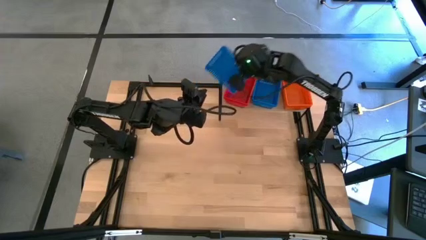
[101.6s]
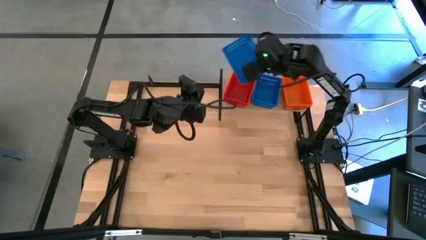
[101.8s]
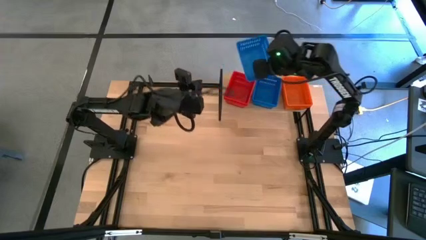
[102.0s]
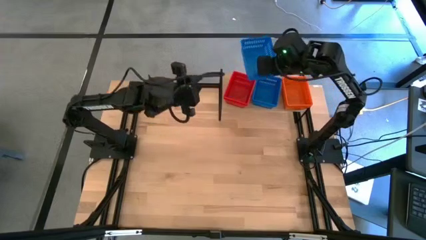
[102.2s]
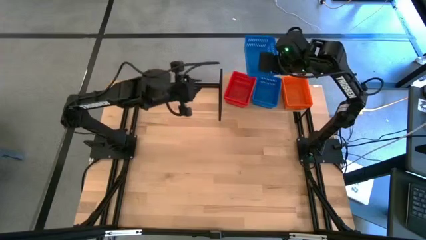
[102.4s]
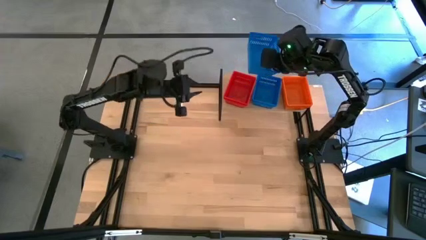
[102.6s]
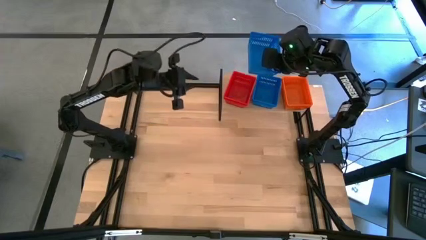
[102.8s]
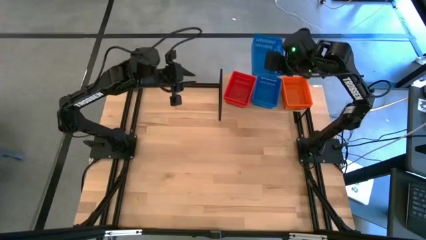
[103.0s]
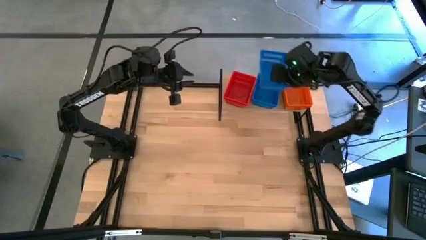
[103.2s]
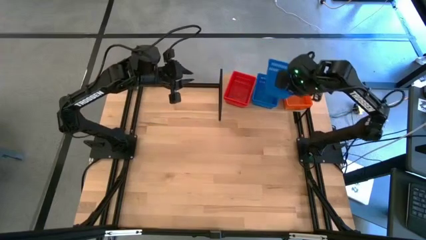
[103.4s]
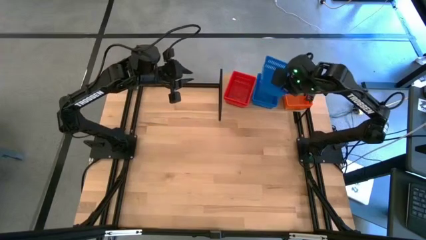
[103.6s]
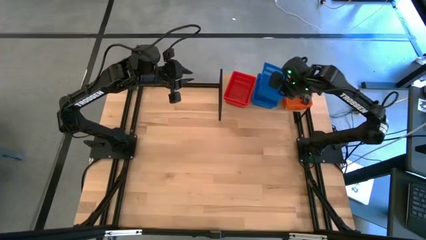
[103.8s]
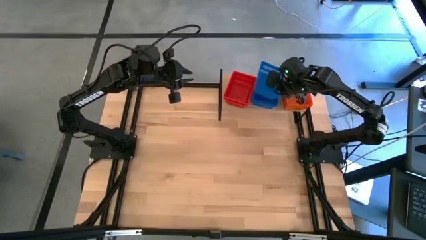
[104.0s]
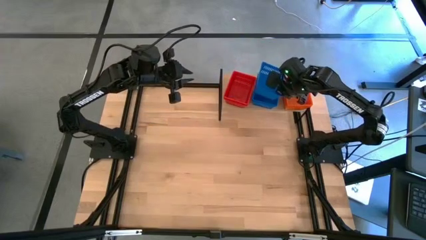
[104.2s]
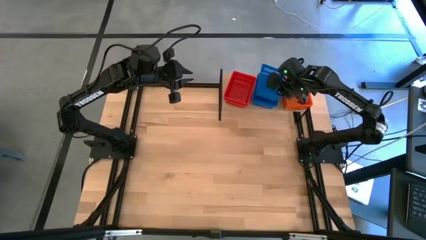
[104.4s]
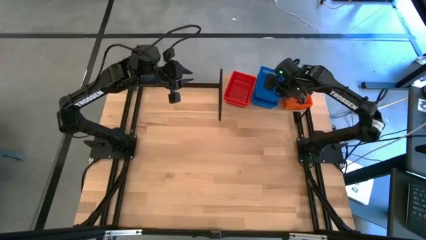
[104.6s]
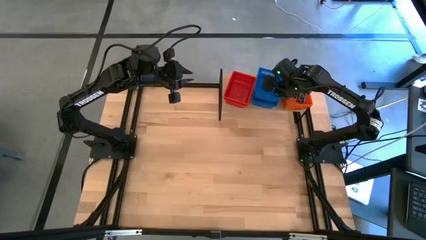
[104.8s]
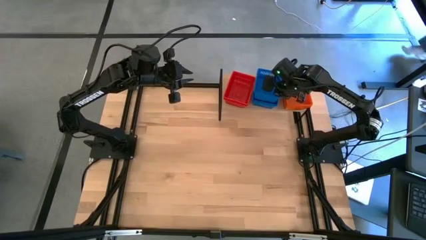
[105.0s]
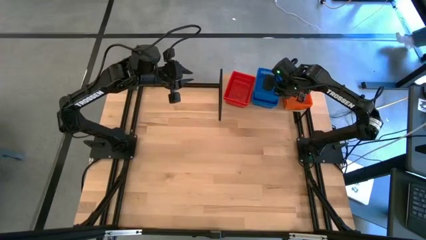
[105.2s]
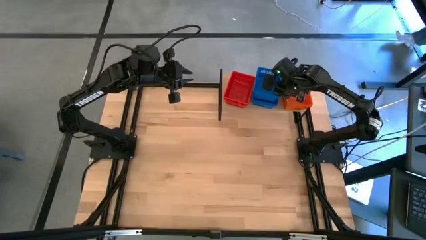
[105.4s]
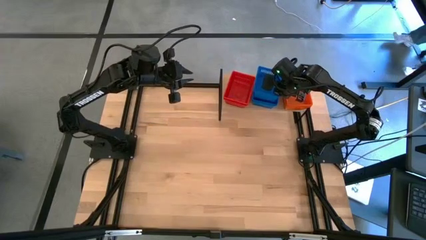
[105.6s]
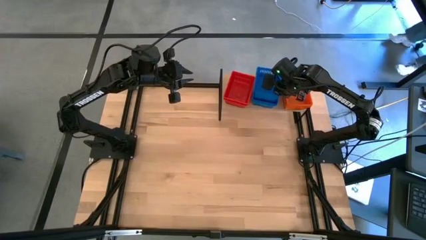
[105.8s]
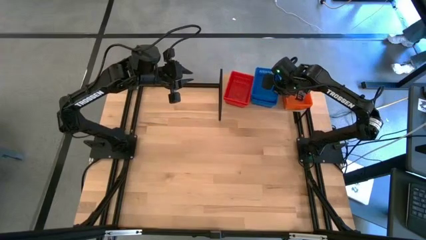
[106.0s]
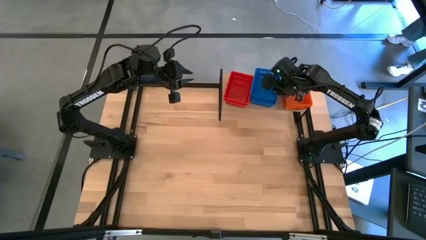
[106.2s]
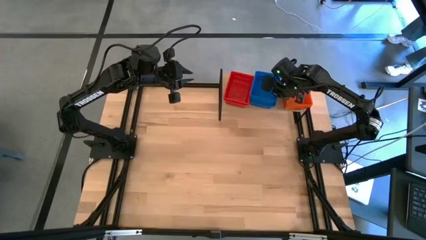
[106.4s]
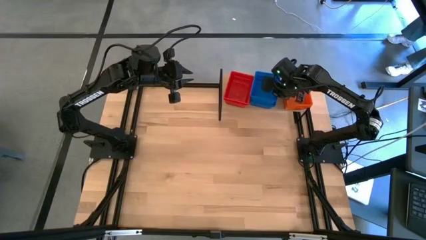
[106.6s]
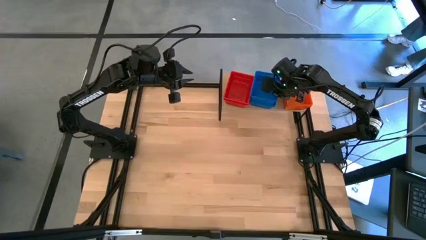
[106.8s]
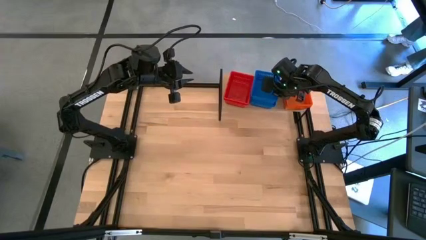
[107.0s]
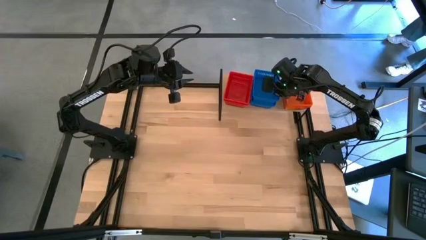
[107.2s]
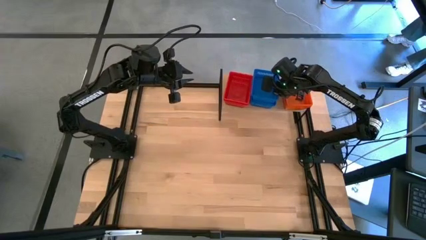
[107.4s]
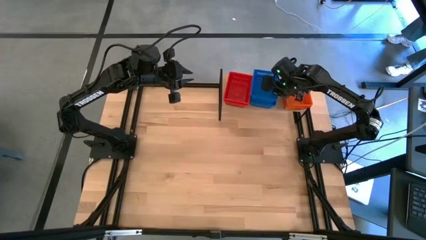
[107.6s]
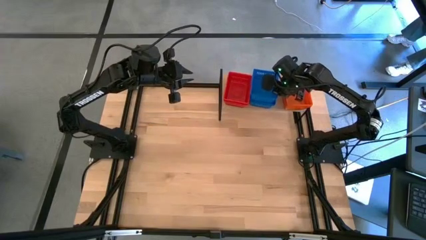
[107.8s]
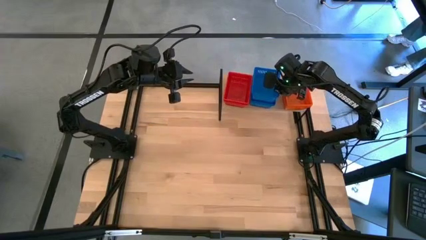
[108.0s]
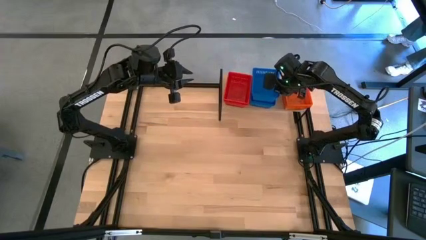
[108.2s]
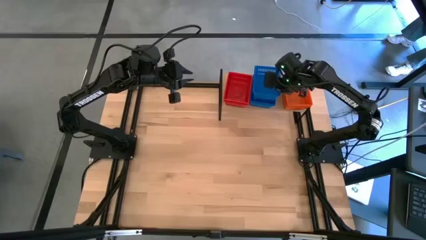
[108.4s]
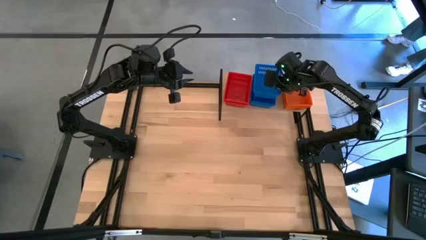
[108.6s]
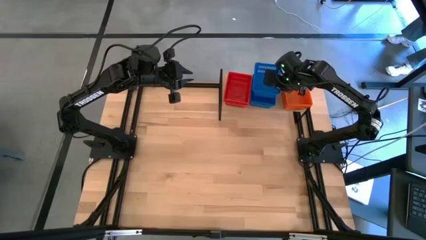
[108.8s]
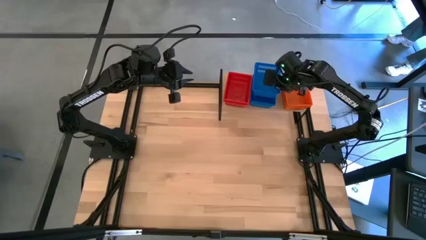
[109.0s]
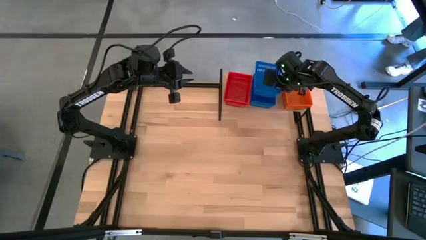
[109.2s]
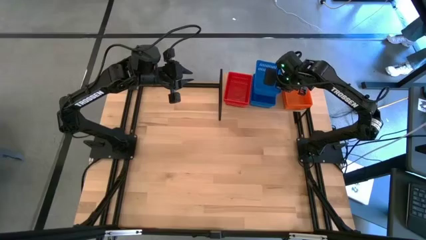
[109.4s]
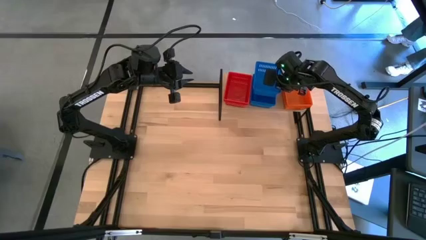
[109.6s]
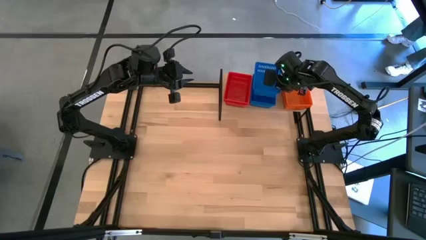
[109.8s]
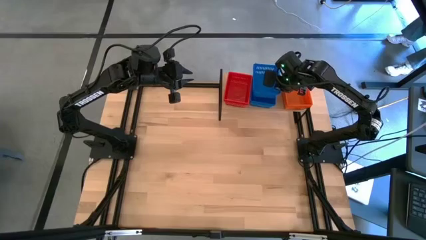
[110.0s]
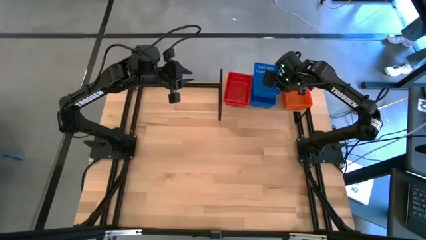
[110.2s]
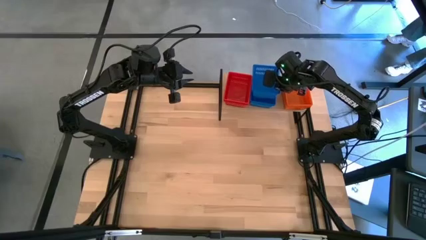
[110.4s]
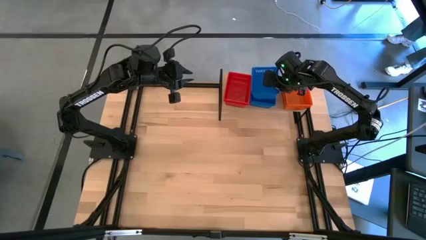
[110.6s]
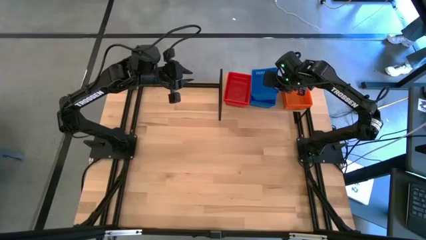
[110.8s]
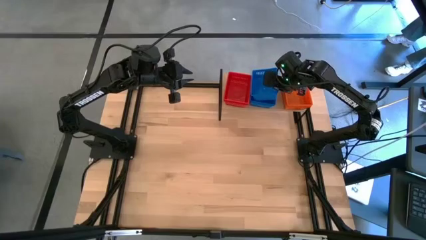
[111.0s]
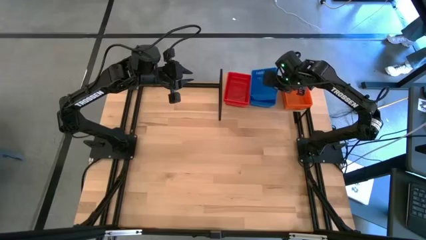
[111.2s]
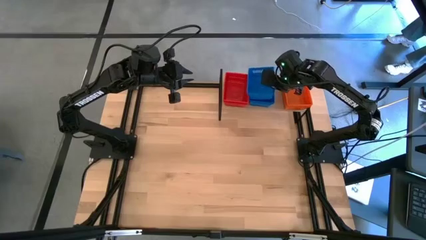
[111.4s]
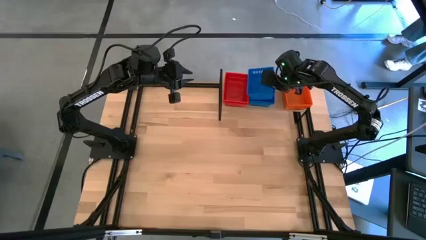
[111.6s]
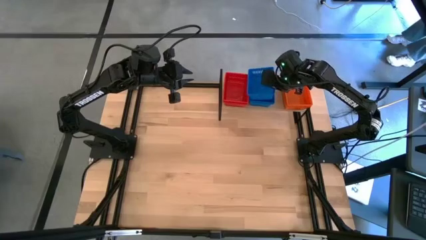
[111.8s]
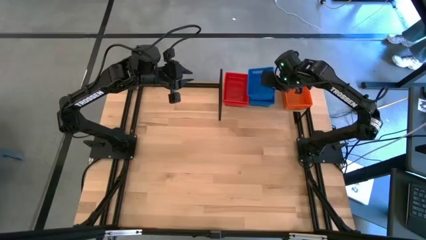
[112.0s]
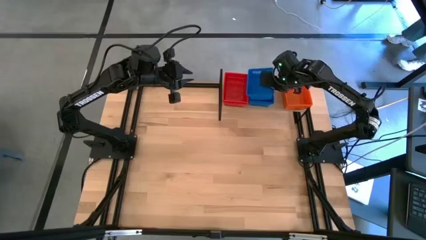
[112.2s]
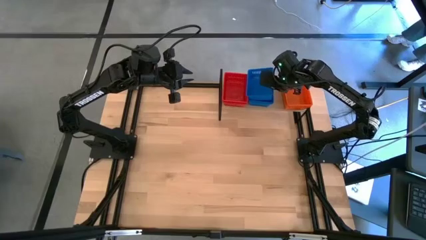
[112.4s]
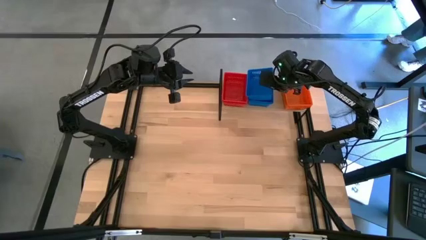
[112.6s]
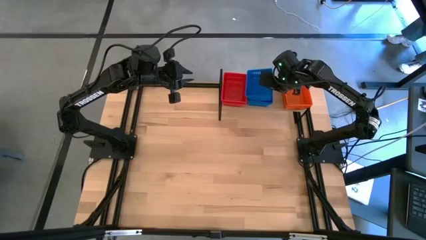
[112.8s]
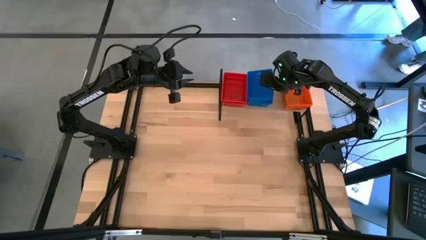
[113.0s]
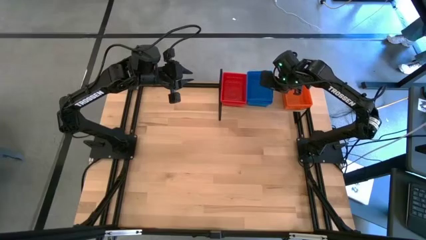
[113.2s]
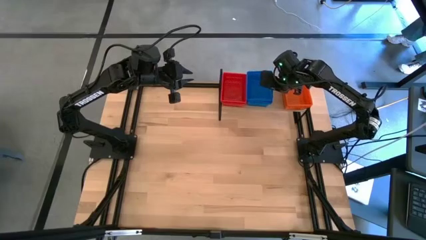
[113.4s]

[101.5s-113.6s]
Task: Stack baskets on shelf by color
Stack the blue bin on top of the stacked blue bins on the shelf

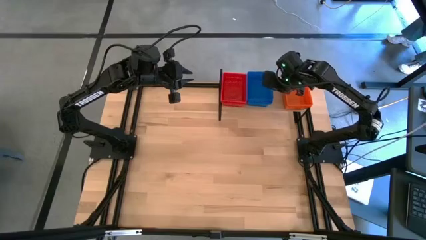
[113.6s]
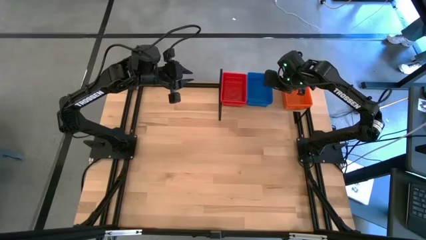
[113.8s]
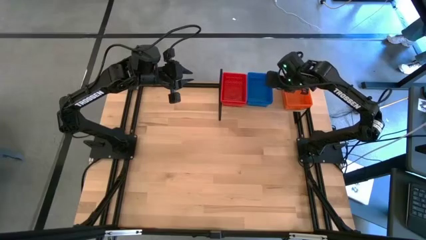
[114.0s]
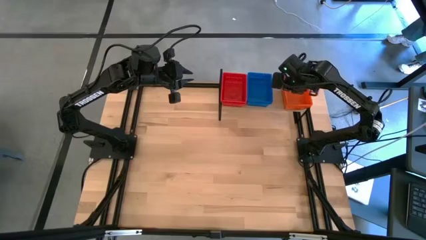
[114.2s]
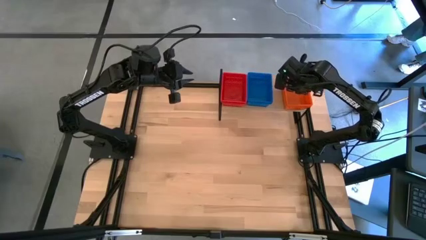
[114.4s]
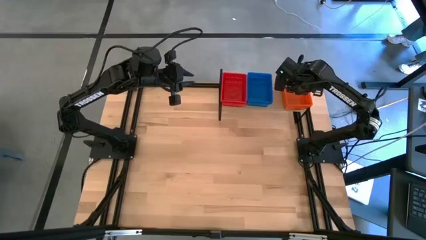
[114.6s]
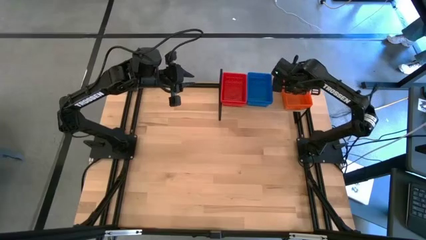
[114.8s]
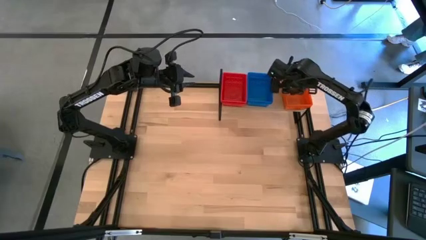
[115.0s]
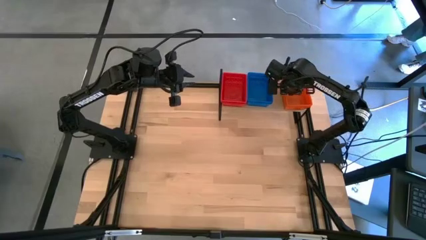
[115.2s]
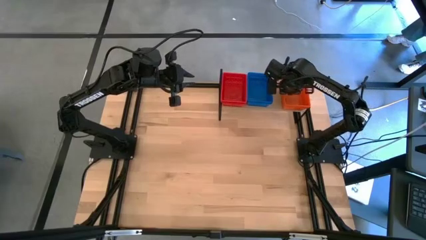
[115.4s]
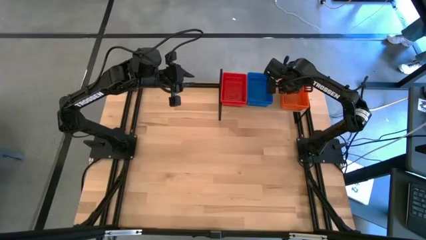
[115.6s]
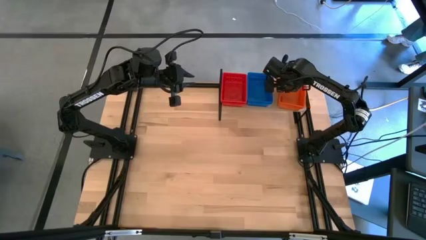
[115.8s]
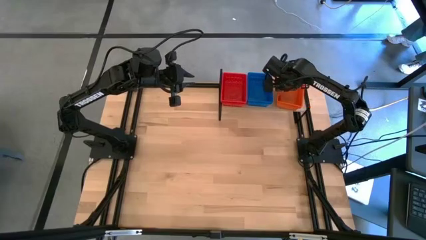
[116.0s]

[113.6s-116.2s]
Adjust the stacked orange bins on the shelf

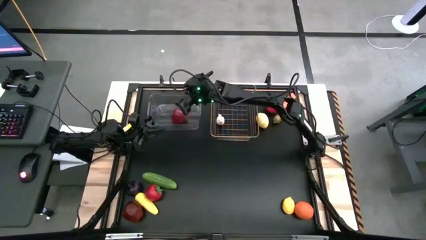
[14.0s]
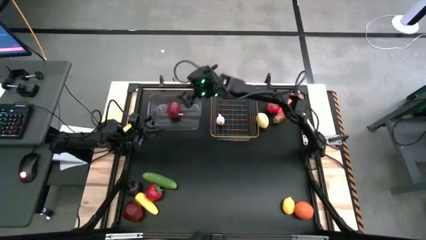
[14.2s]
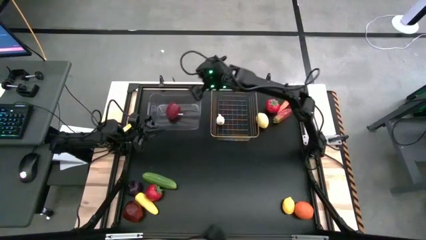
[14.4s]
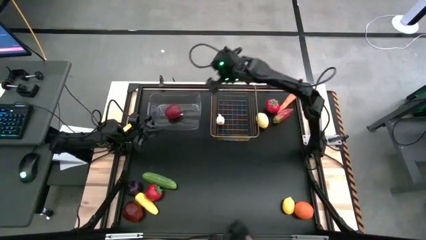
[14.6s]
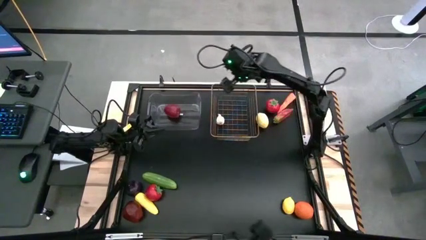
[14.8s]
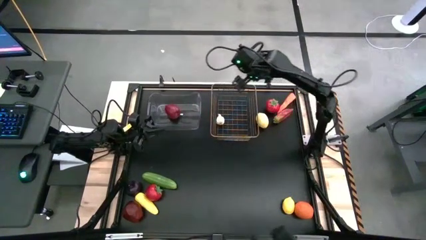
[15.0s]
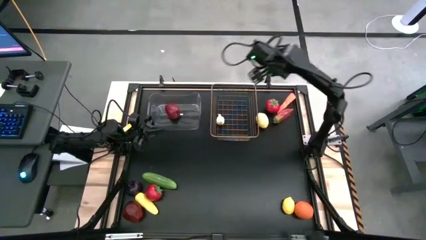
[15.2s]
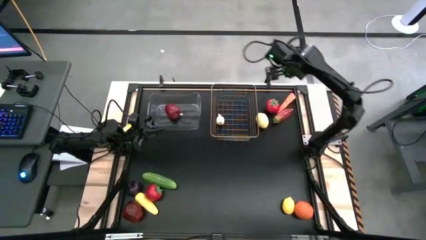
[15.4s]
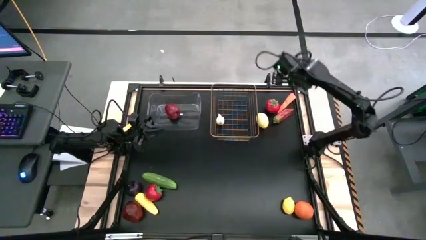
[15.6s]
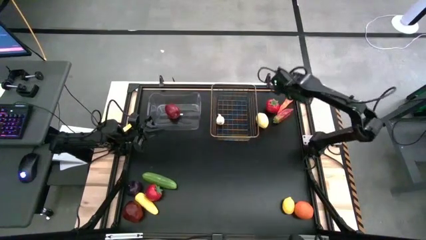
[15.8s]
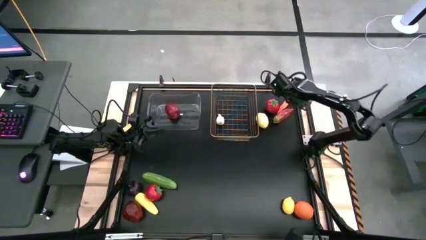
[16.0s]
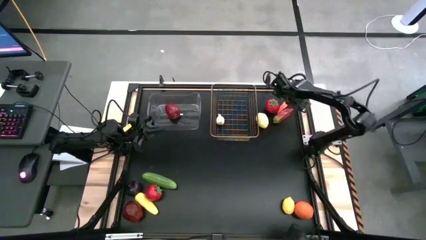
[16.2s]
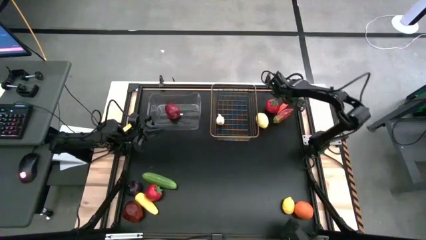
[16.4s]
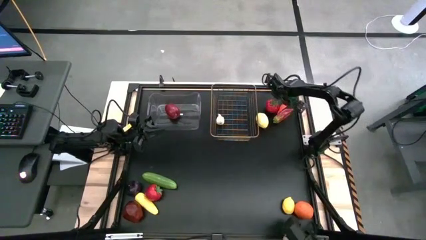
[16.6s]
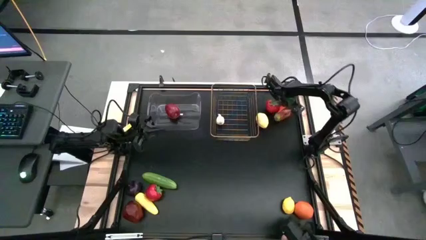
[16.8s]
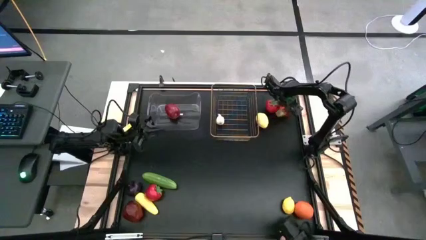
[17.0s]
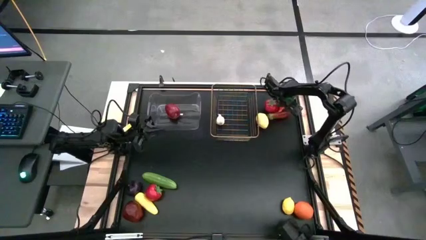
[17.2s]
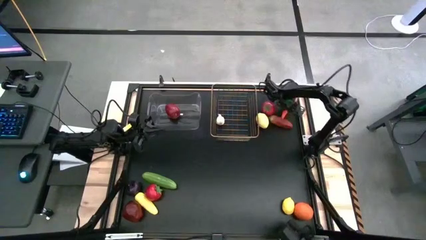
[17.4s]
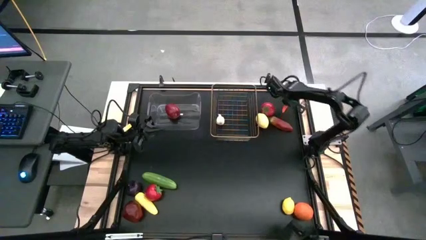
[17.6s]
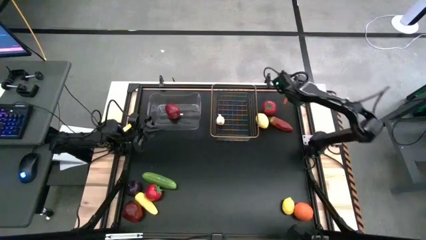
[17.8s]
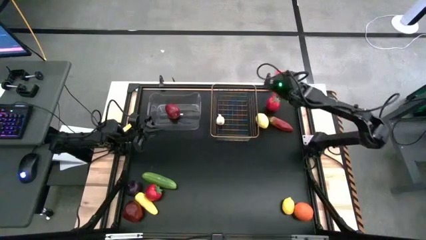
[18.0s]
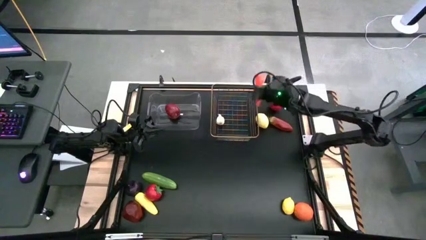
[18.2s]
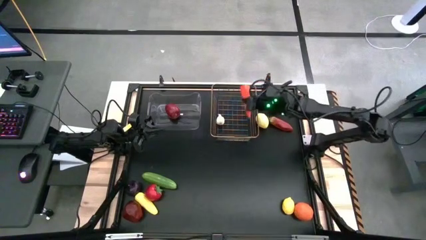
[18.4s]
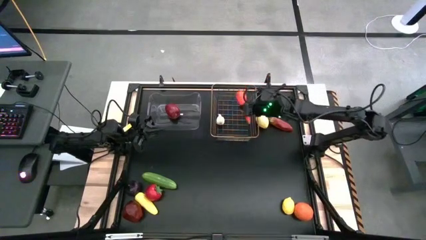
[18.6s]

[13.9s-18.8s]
Task: Sort produce into baskets
Put the carrot into the gold wire basket
